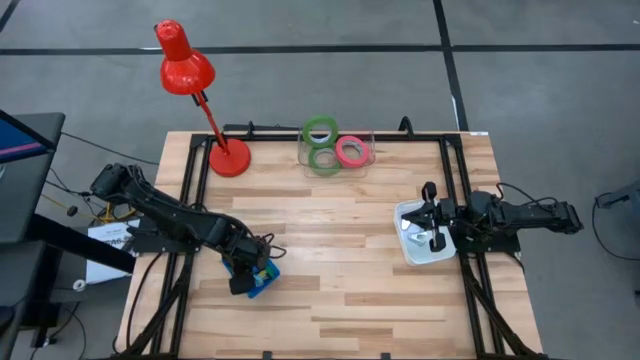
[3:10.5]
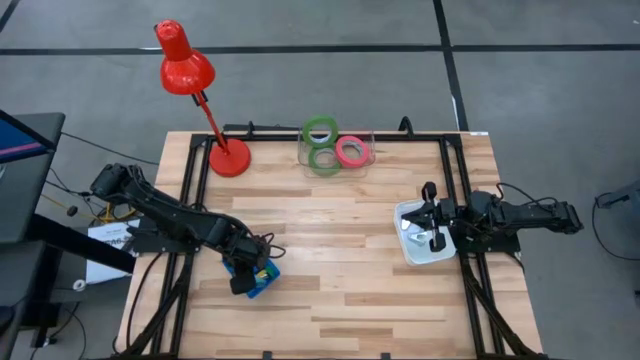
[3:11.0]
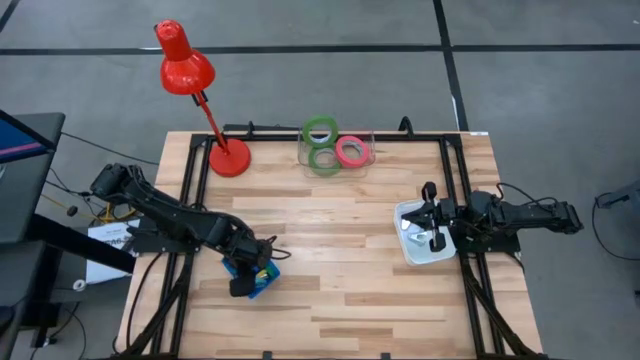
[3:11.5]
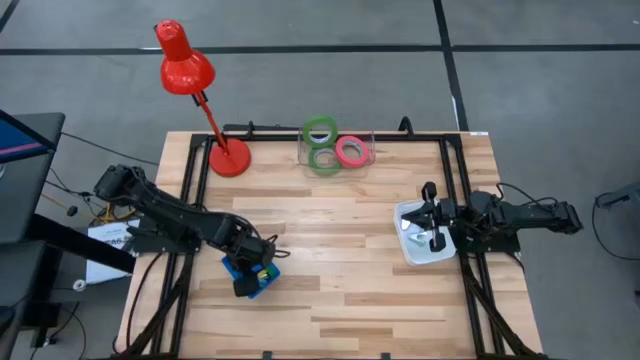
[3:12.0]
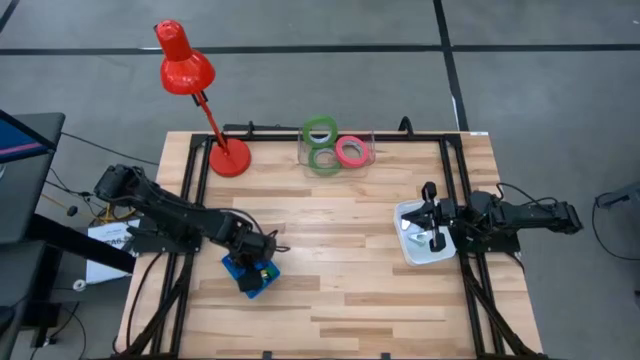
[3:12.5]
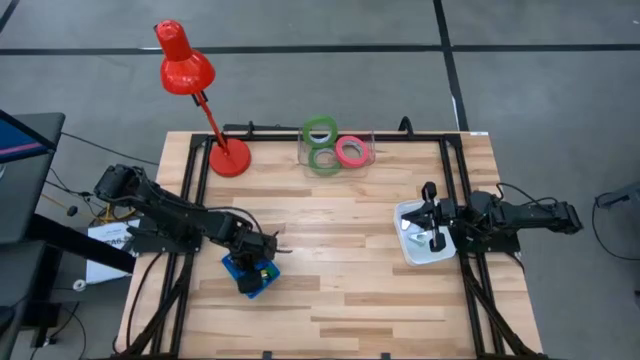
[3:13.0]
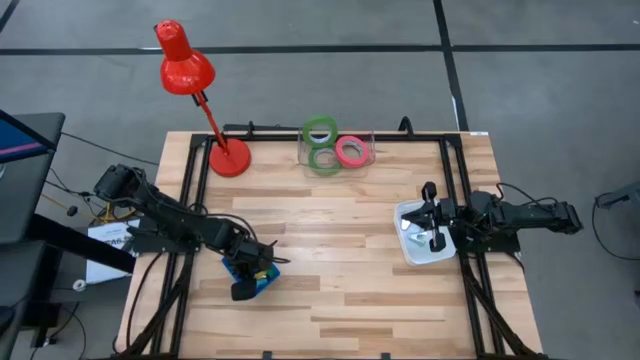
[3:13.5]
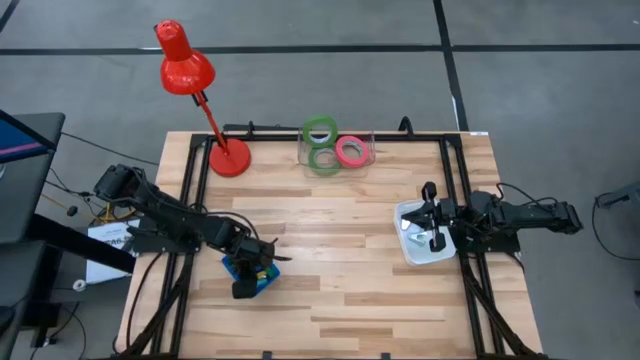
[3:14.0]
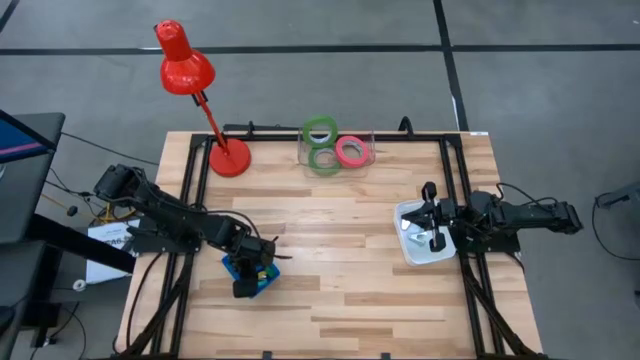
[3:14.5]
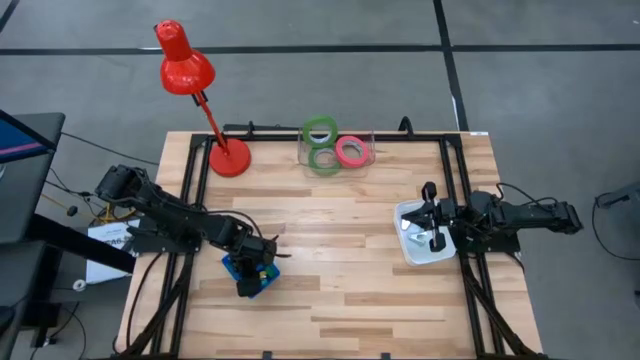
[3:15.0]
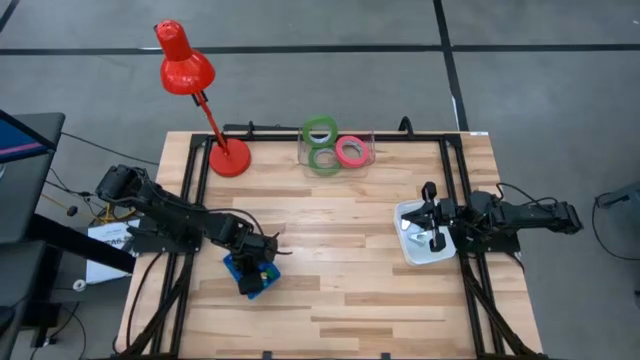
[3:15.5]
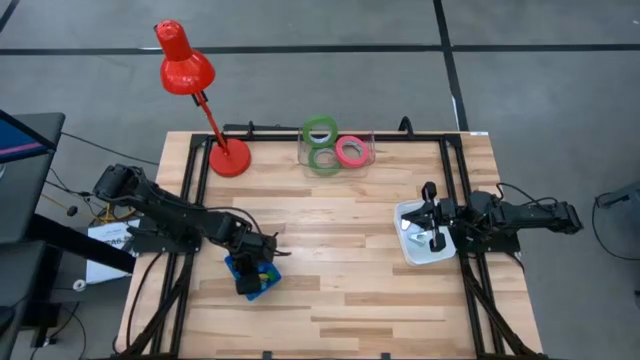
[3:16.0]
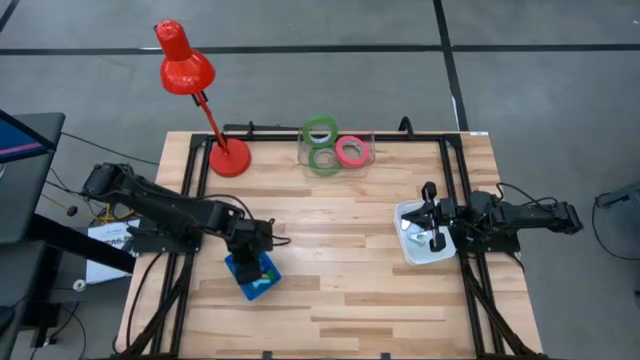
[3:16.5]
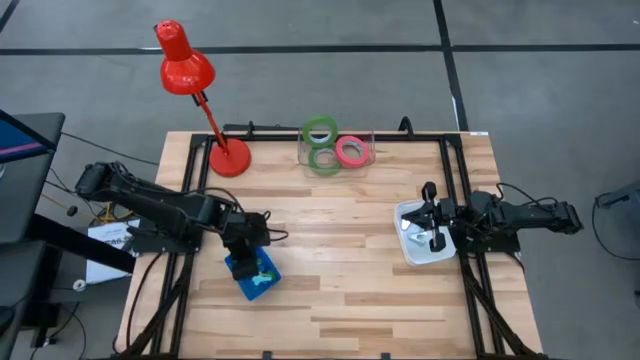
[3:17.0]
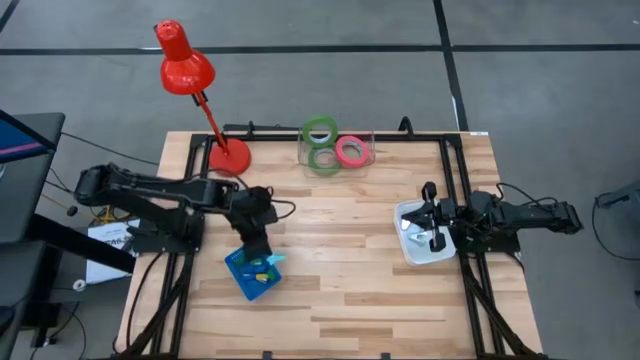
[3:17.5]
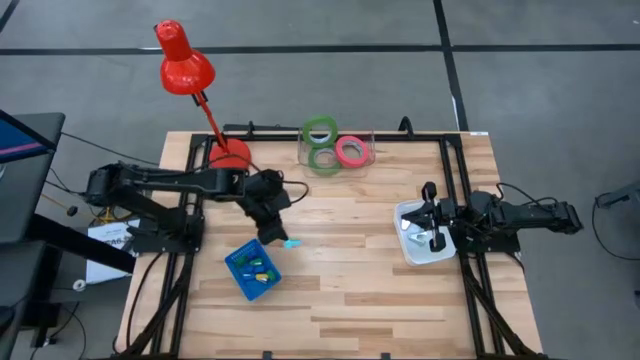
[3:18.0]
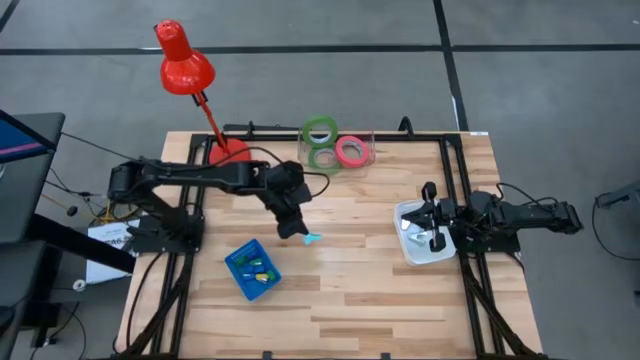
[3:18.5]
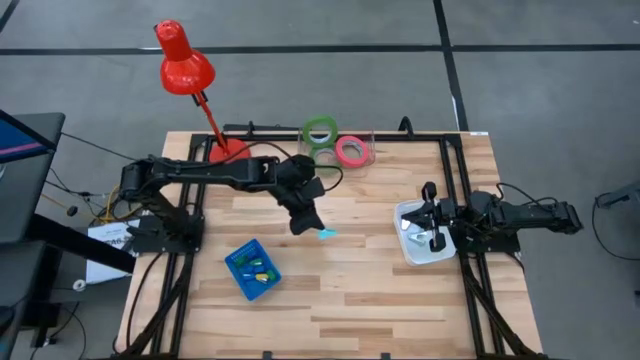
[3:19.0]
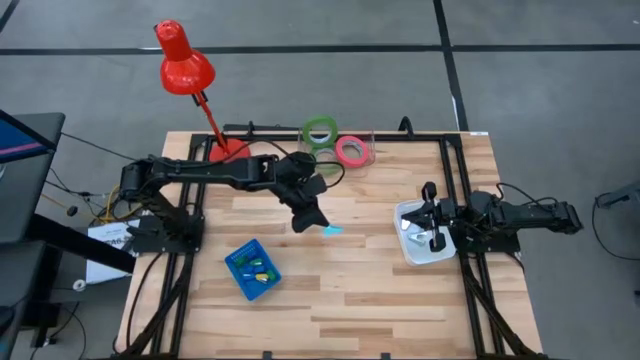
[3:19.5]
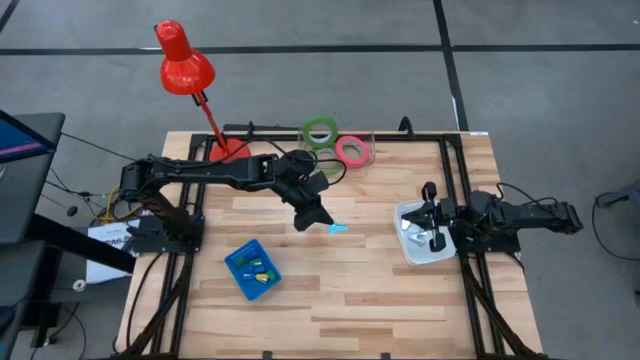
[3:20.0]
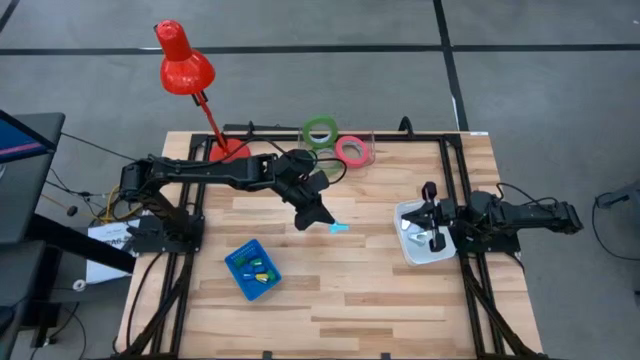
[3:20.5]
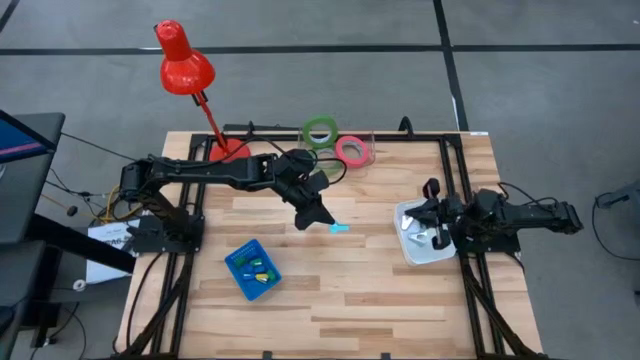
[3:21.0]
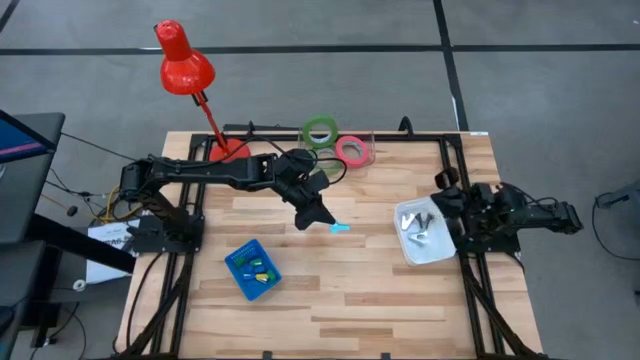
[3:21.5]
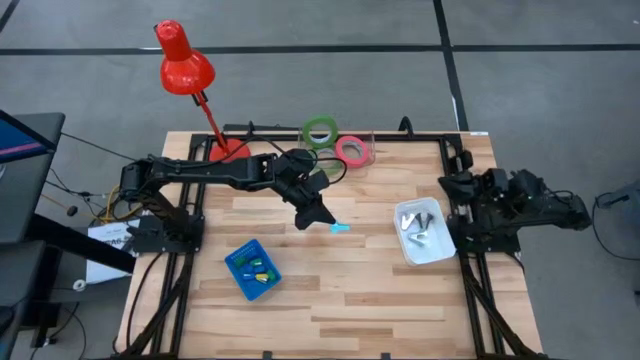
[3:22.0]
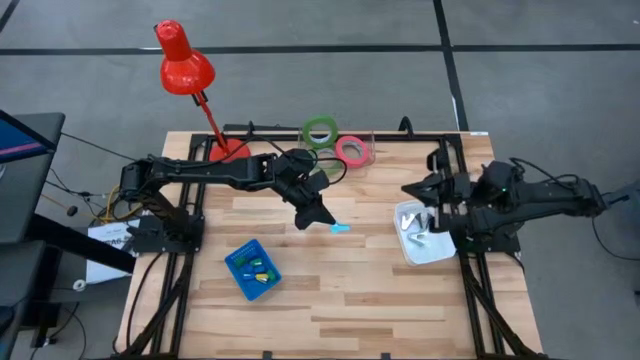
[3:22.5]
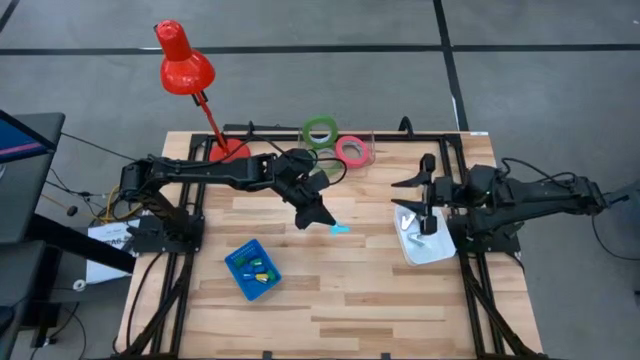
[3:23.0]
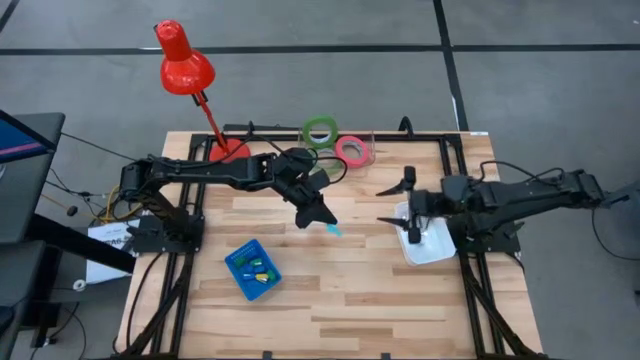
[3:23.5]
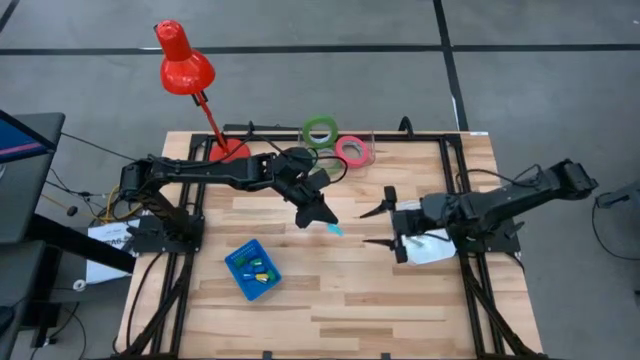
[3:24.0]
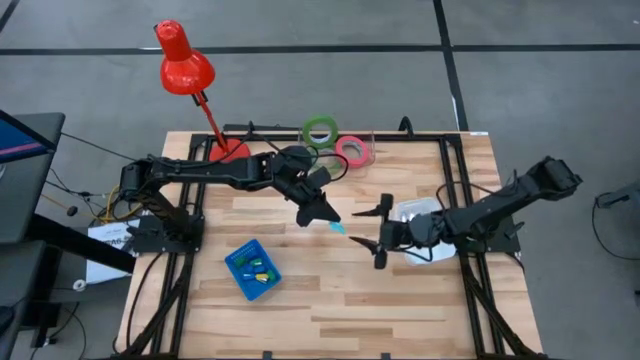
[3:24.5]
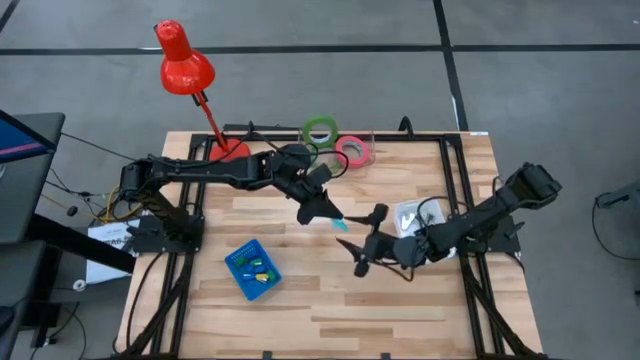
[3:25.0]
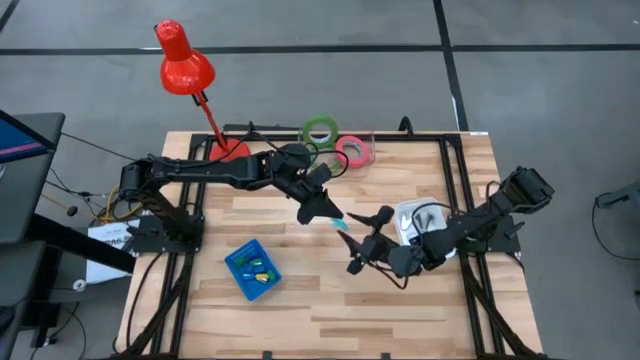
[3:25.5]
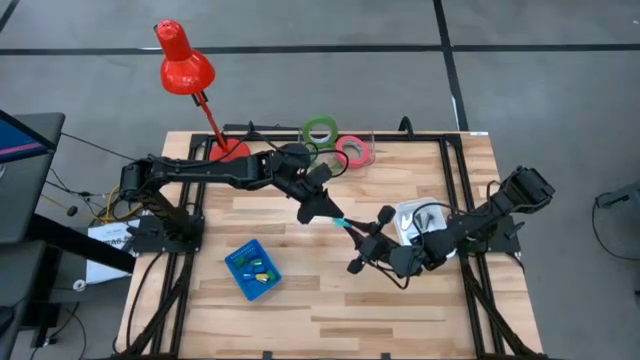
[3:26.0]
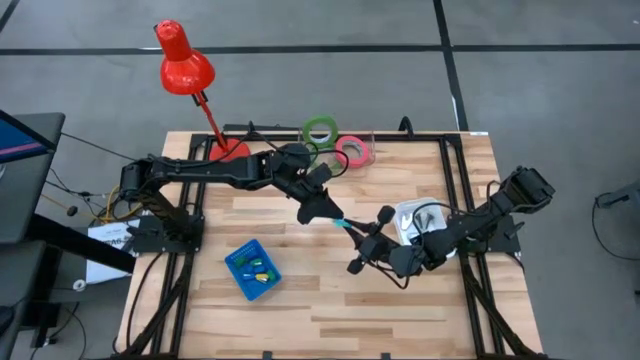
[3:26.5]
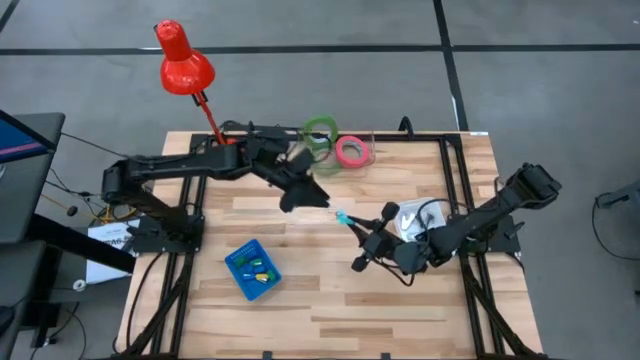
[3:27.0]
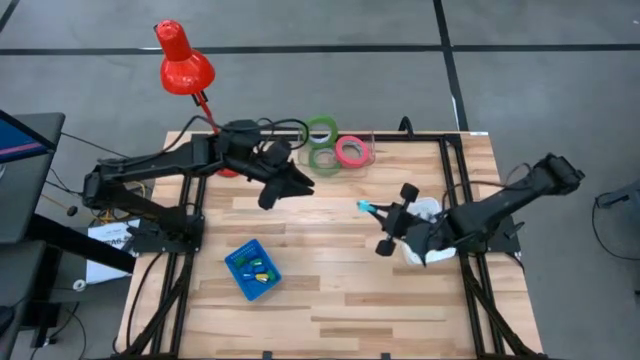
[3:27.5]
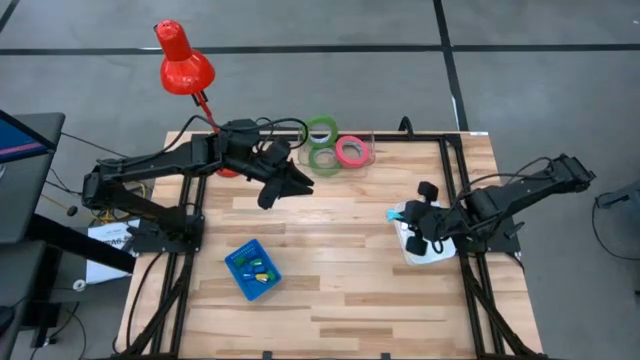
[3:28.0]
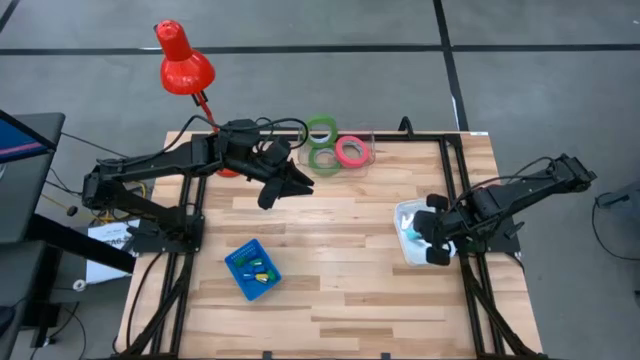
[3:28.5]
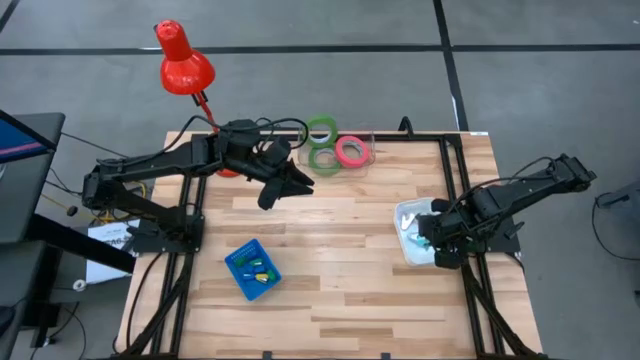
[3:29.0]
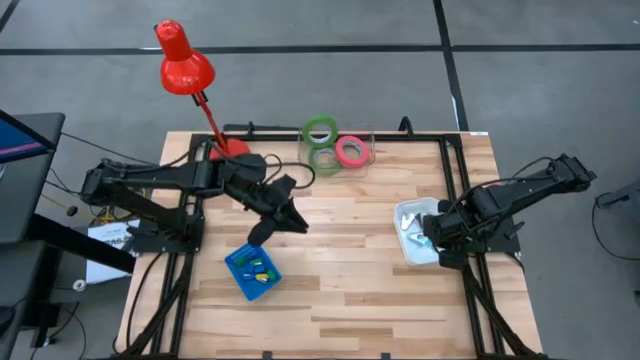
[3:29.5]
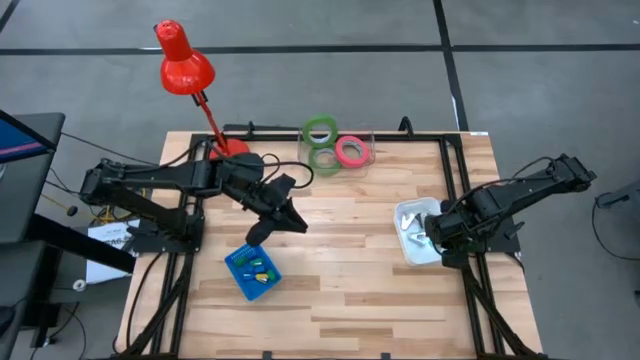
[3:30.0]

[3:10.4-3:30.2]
Task: Pick and place Stapler, Stapler remover, tape
Put the light blue stapler remover into the white bin

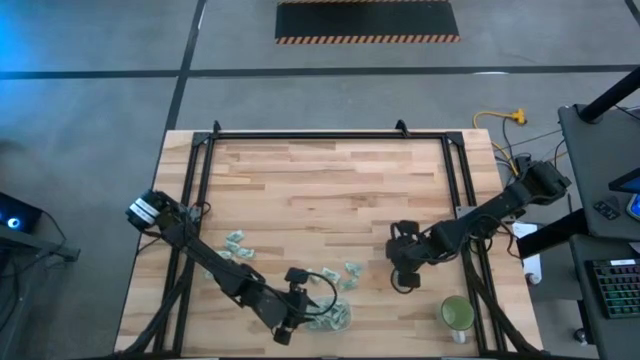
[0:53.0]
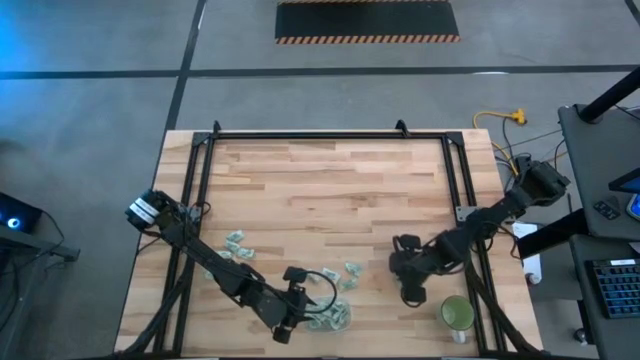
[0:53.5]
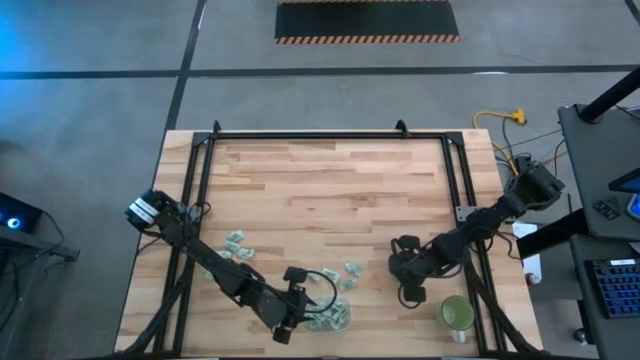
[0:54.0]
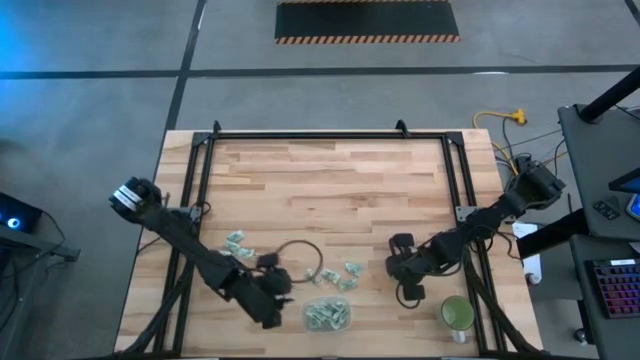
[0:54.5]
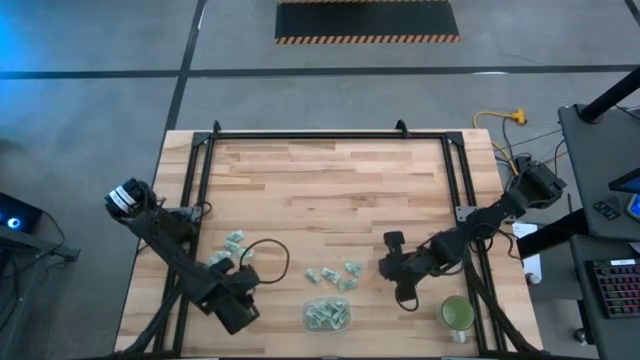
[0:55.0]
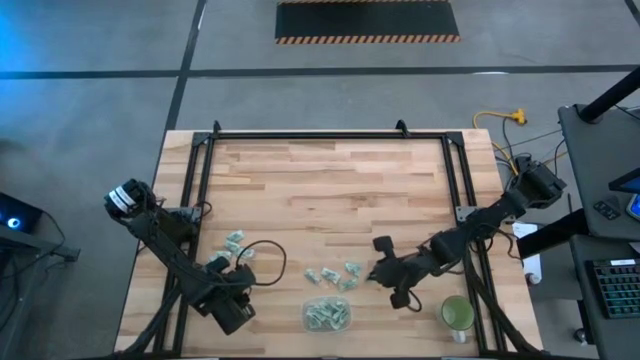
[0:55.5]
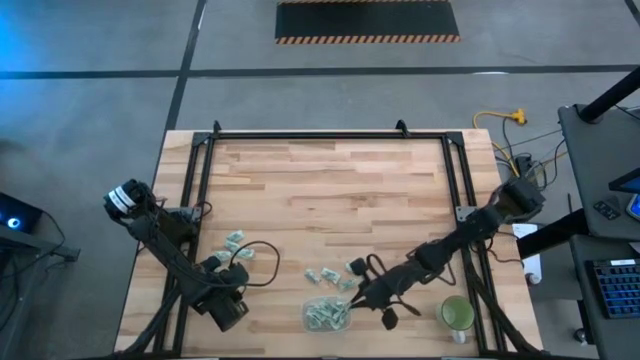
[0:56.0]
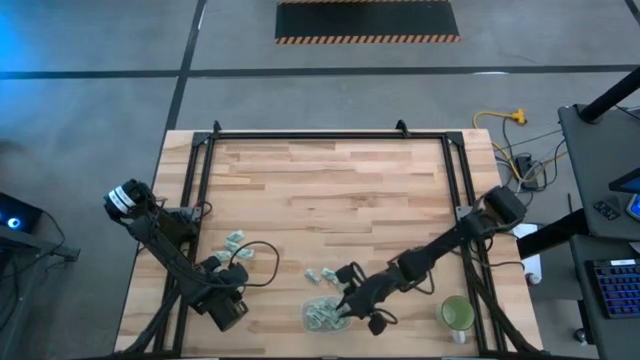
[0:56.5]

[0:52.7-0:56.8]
Task: Pick and place Stevia / Truvia into bins
Put the stevia packet into the transparent container
